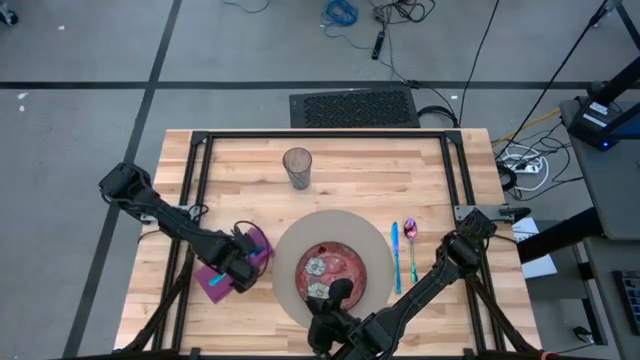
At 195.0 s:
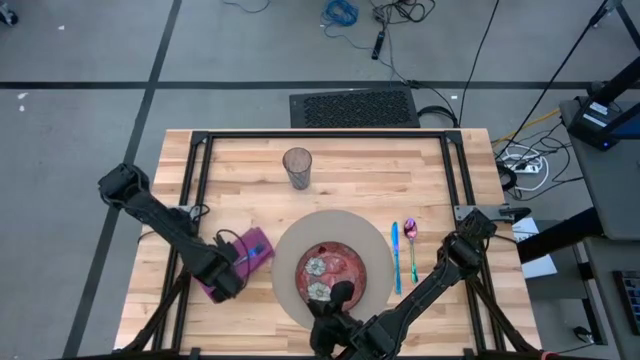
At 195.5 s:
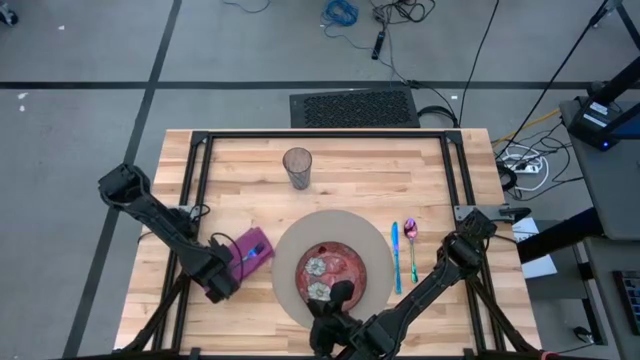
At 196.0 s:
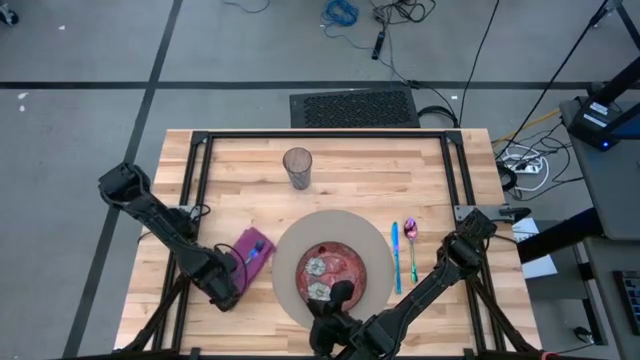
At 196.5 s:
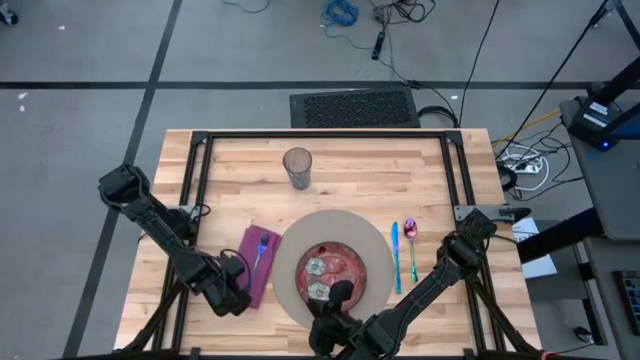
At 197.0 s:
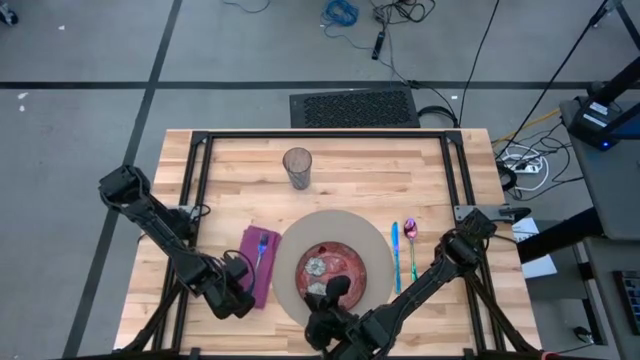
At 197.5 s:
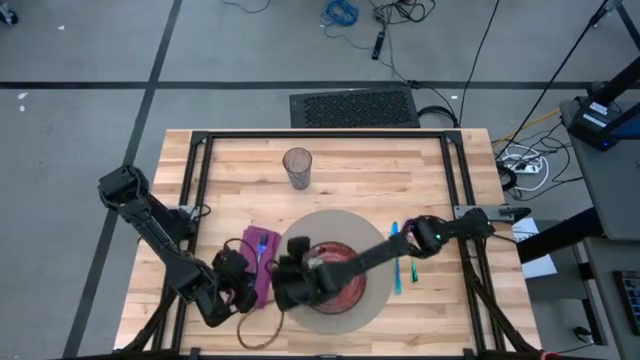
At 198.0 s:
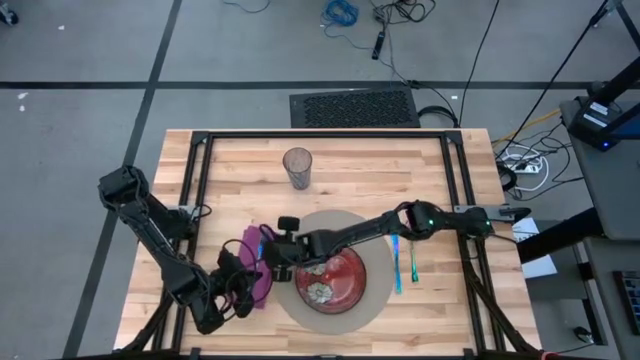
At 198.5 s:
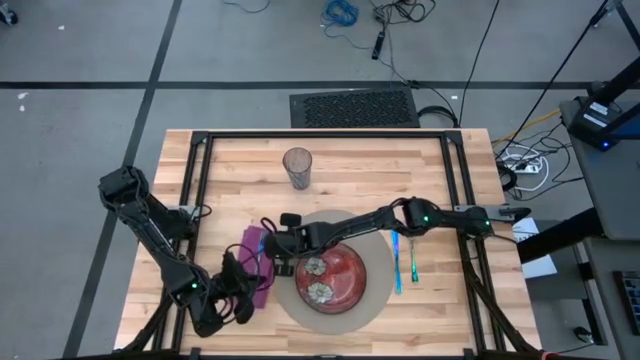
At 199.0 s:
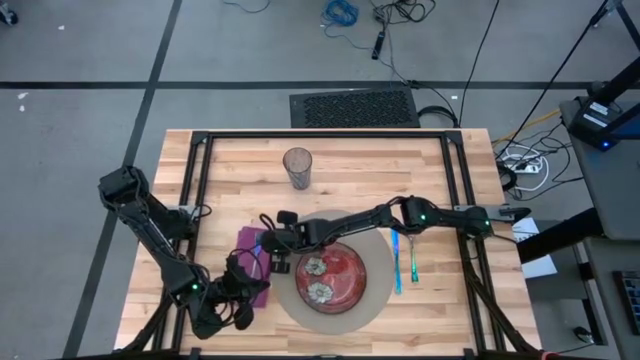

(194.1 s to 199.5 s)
Task: Set table place
Adjust the pink table napkin

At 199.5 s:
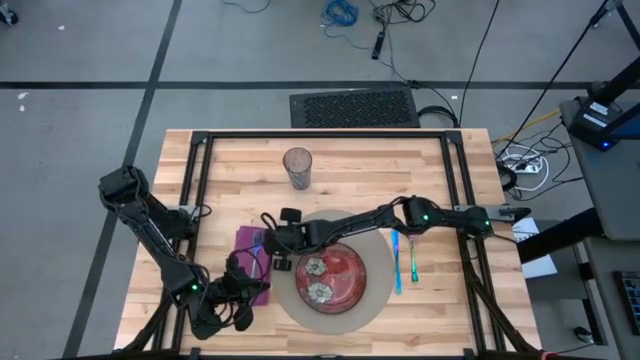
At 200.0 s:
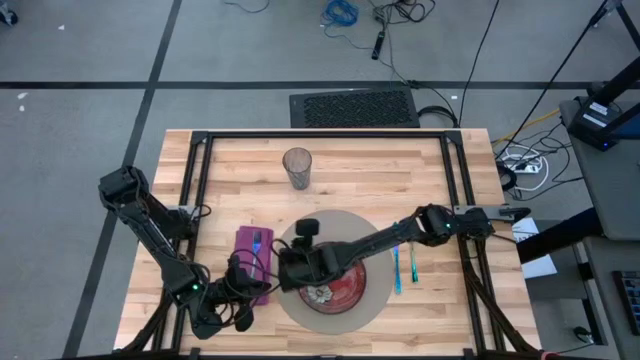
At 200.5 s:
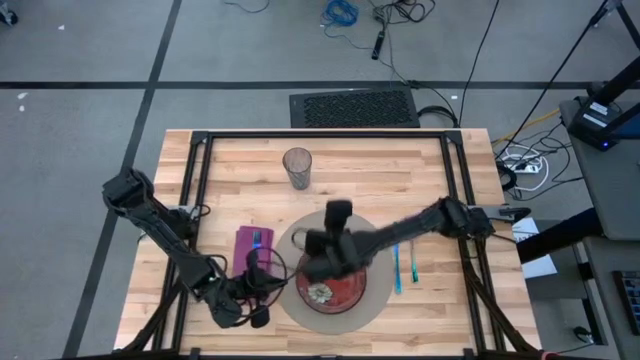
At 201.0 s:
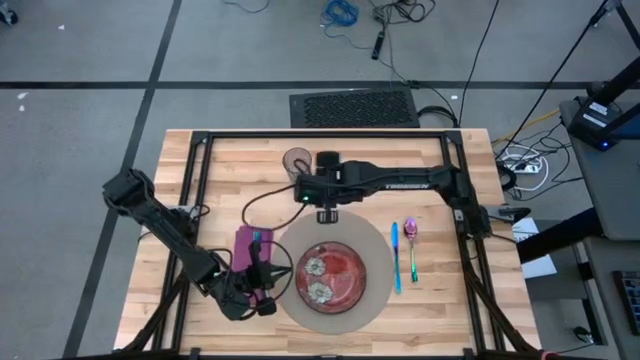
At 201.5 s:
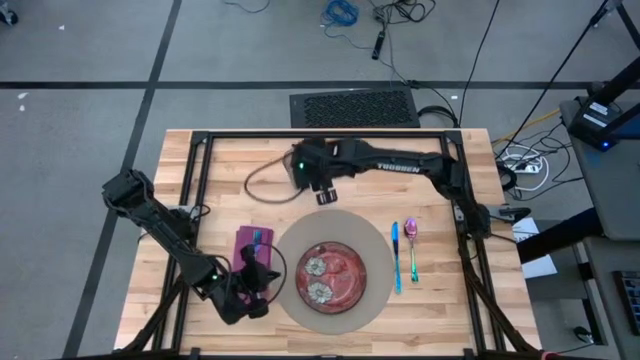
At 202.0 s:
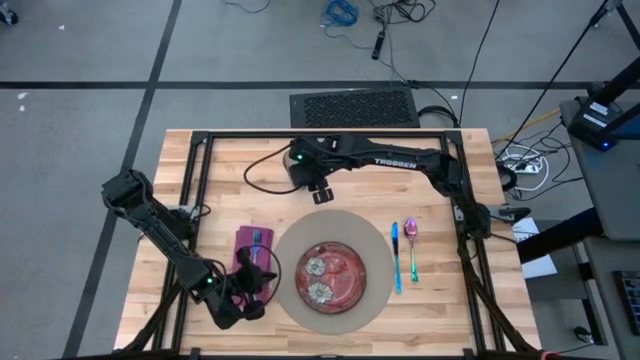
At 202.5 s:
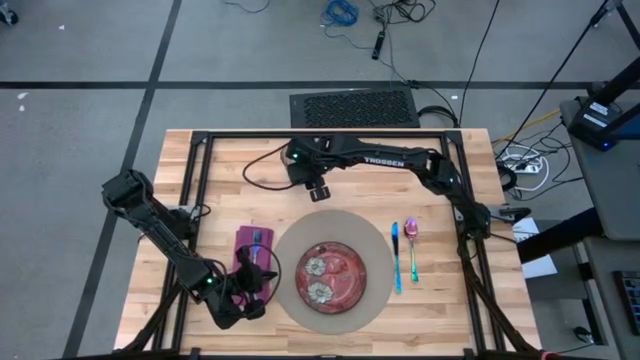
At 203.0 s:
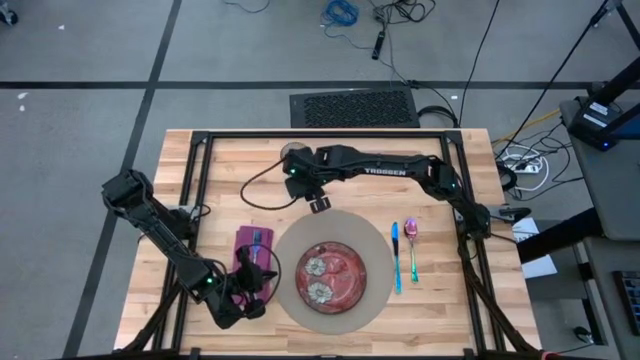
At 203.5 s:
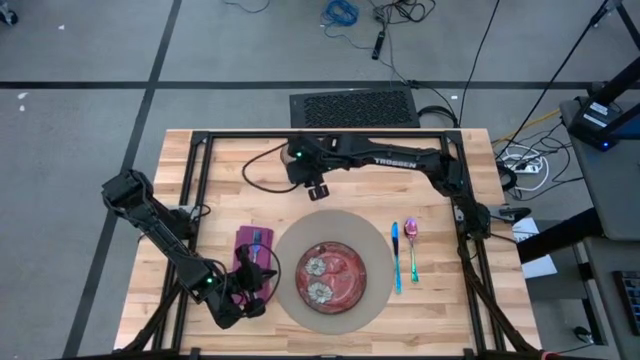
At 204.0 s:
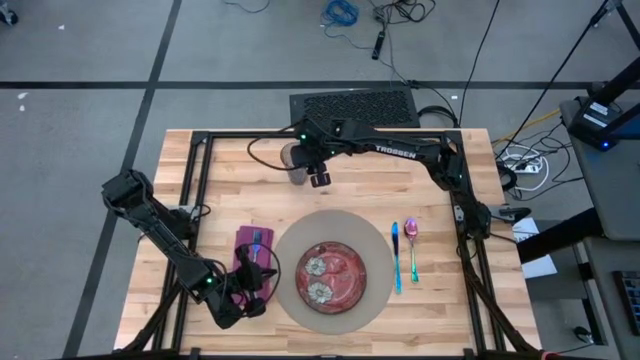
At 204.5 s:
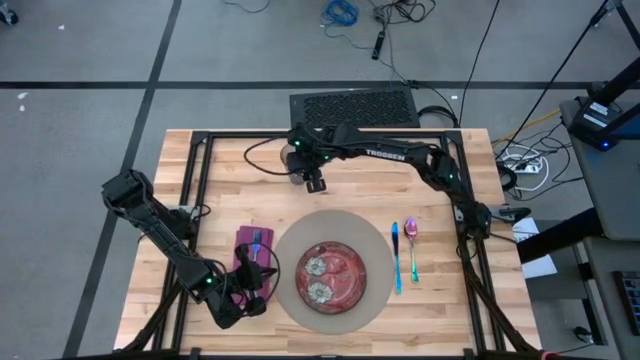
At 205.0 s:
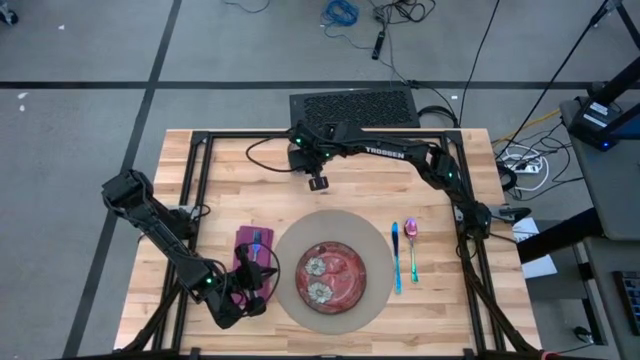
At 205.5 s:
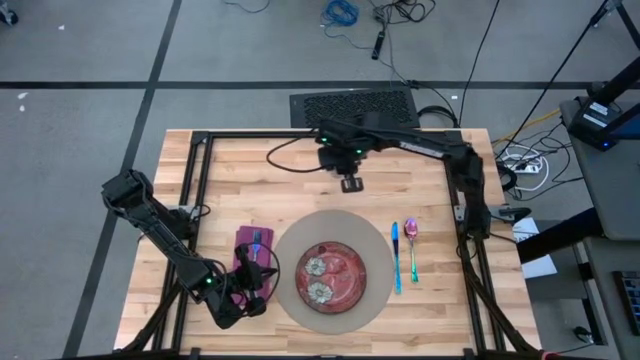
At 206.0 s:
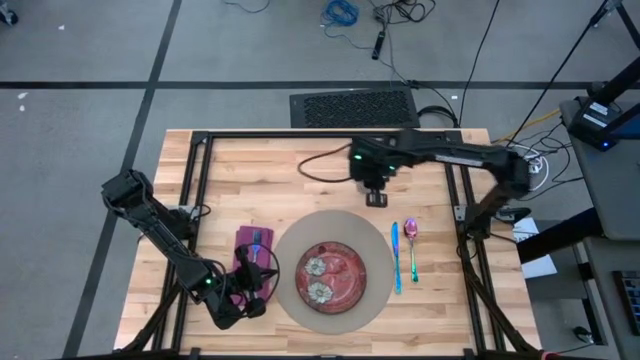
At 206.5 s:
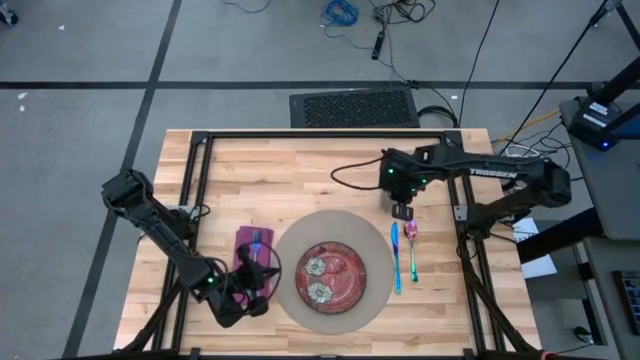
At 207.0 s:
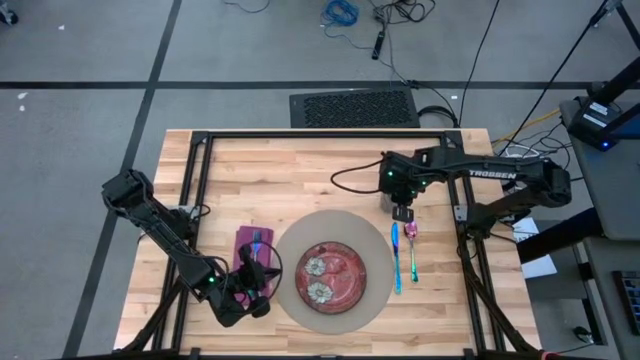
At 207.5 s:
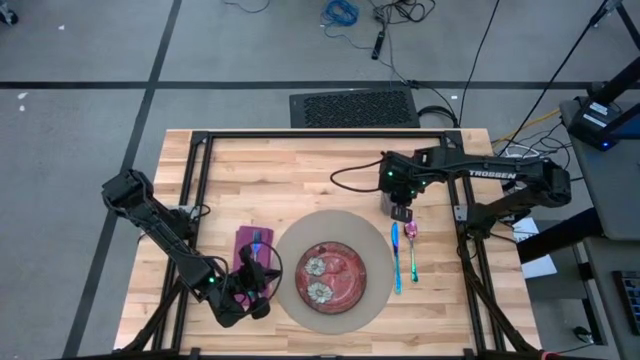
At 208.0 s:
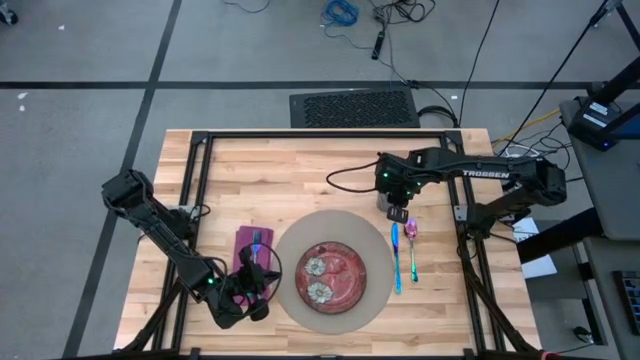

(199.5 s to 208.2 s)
Move the blue glass to the top right side of the gray placemat

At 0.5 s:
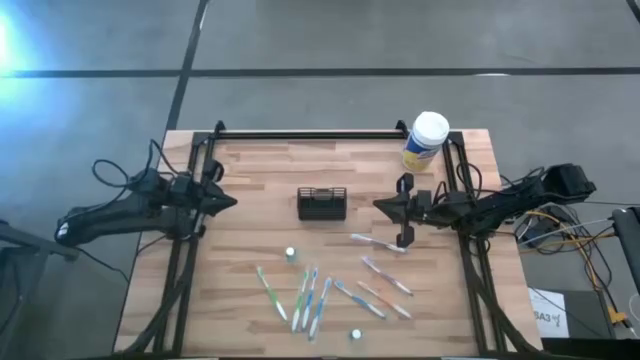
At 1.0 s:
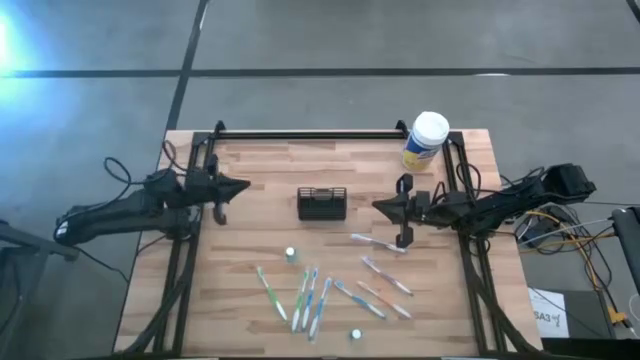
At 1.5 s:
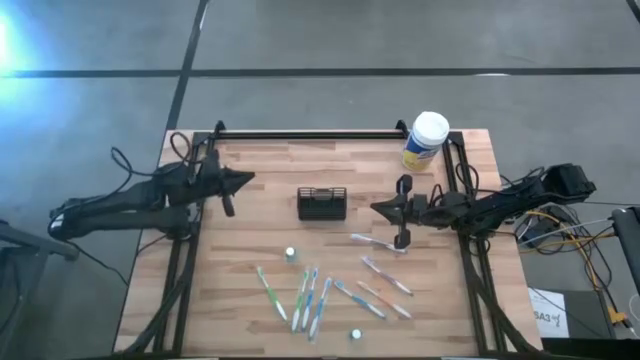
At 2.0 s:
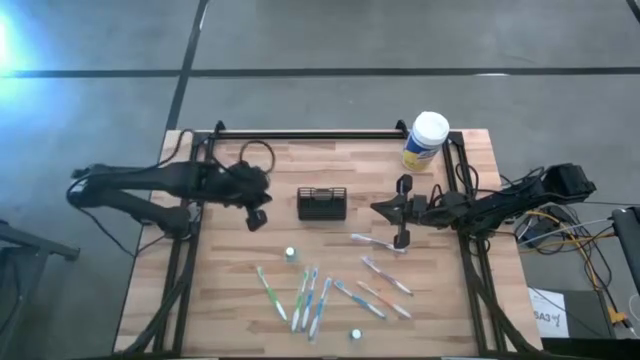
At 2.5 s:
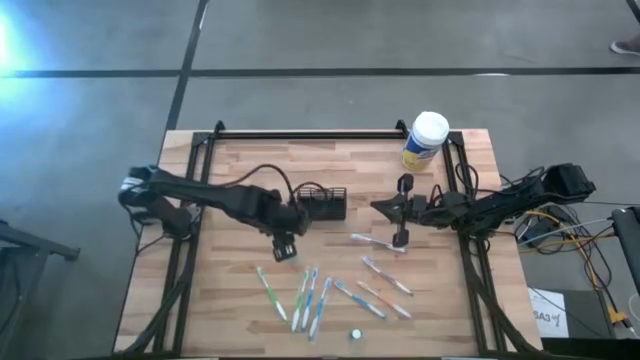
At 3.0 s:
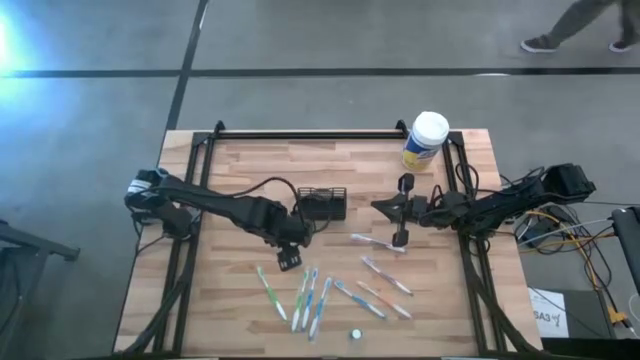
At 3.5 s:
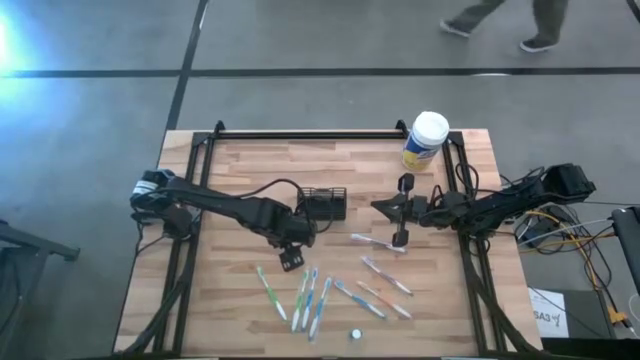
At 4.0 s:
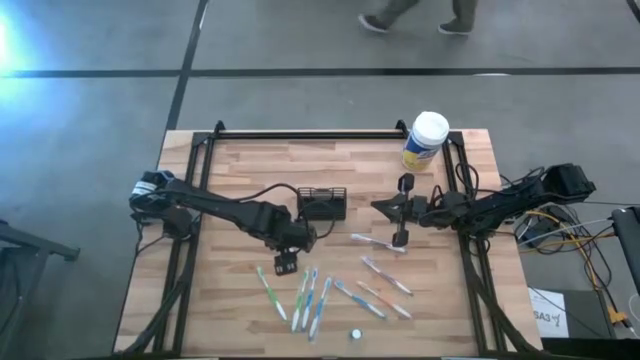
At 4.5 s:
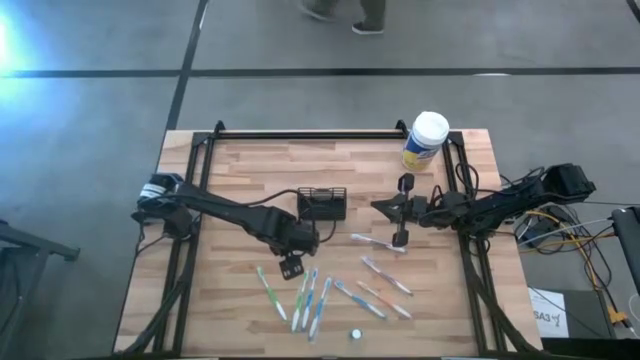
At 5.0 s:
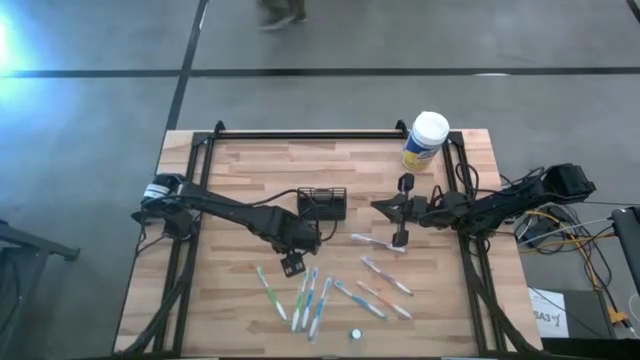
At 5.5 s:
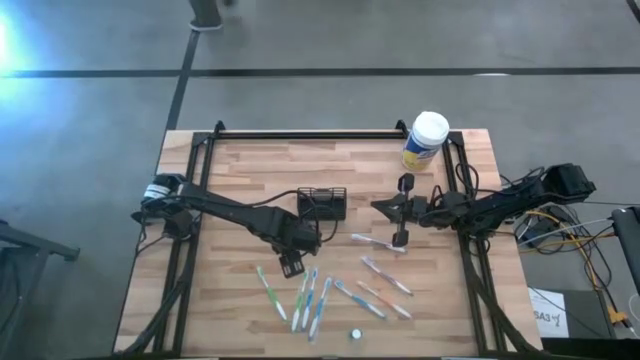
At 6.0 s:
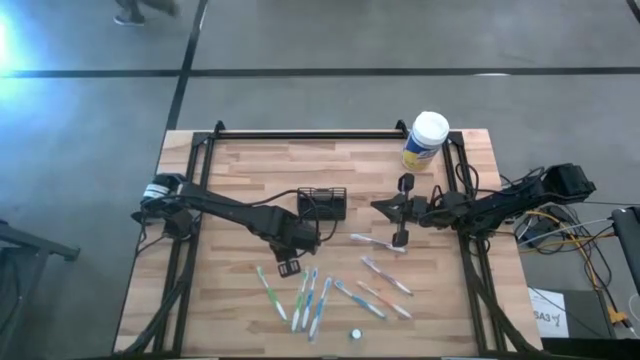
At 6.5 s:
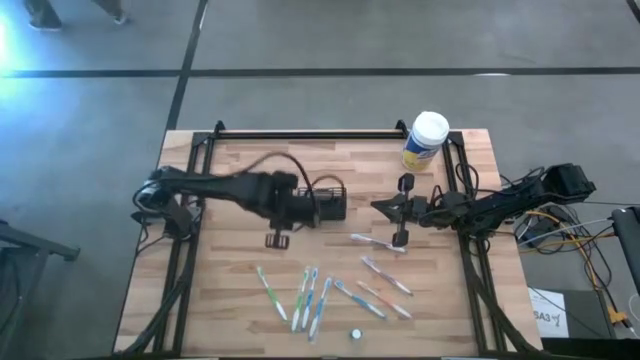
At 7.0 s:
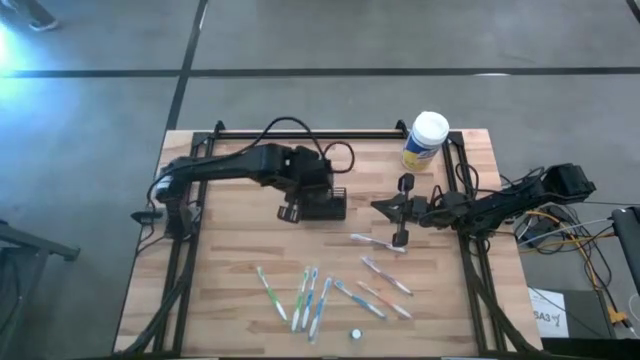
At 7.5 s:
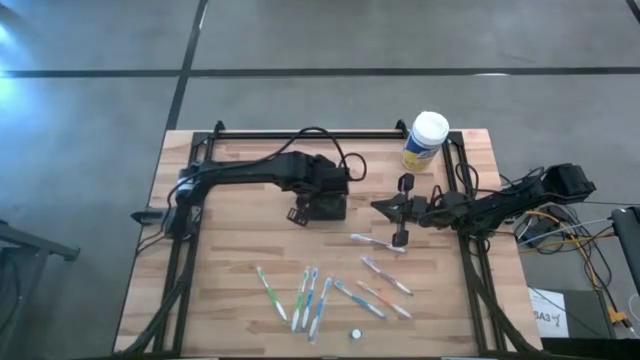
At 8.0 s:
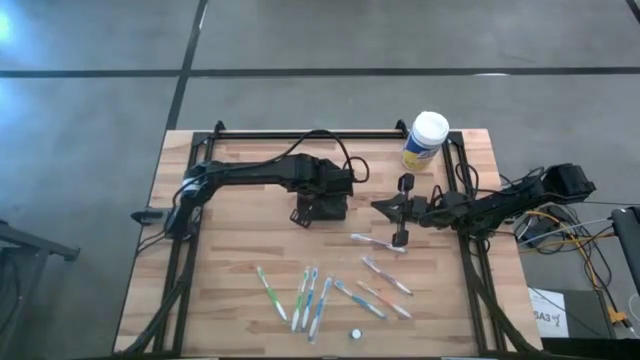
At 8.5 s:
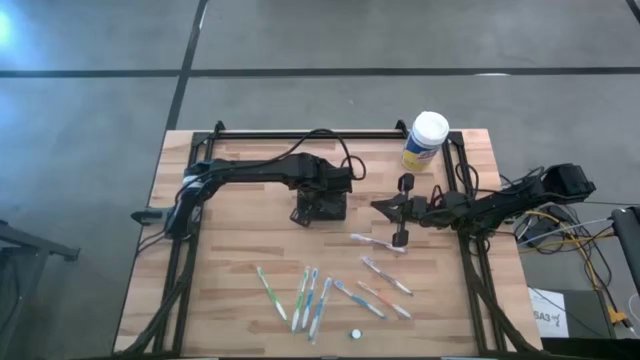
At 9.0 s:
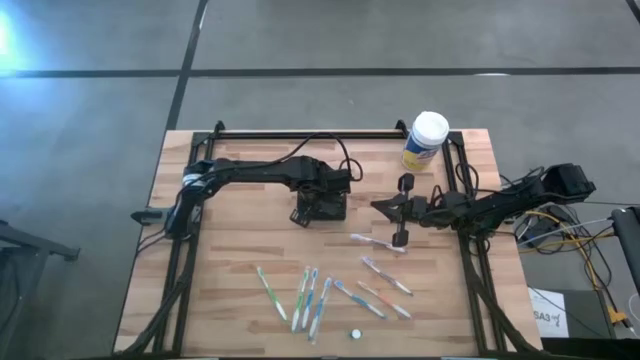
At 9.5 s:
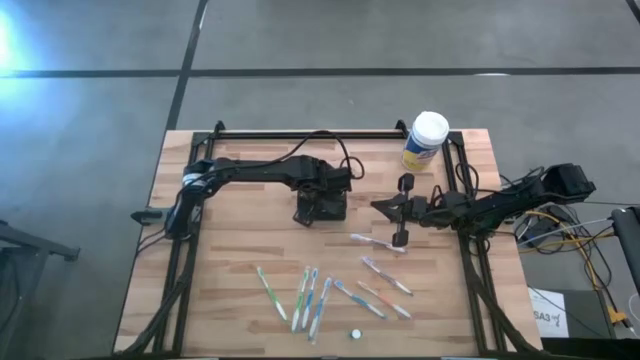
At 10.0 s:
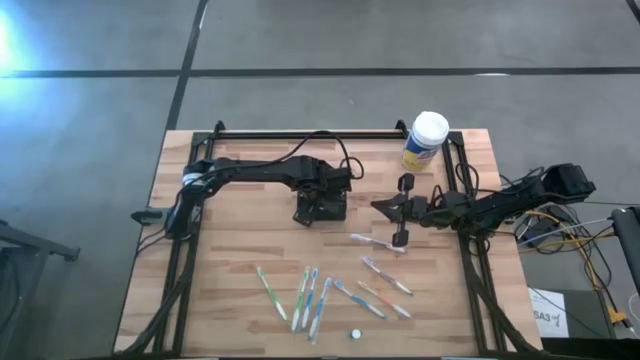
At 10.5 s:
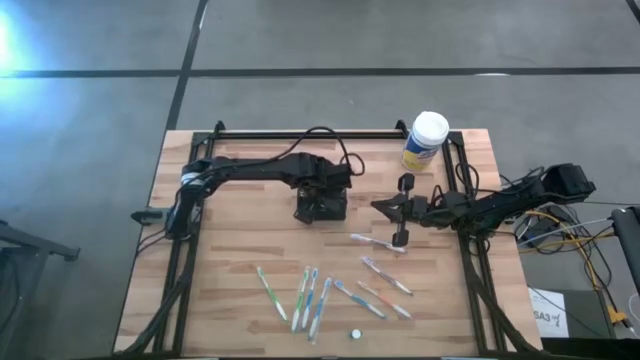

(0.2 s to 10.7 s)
Task: Pick & Place toothbrushing station
Put the top blue mouthwash in the wire organizer
